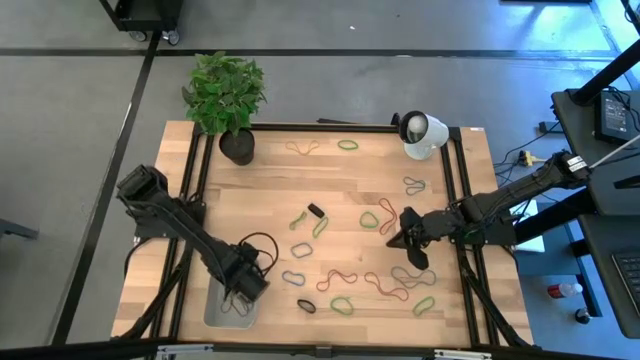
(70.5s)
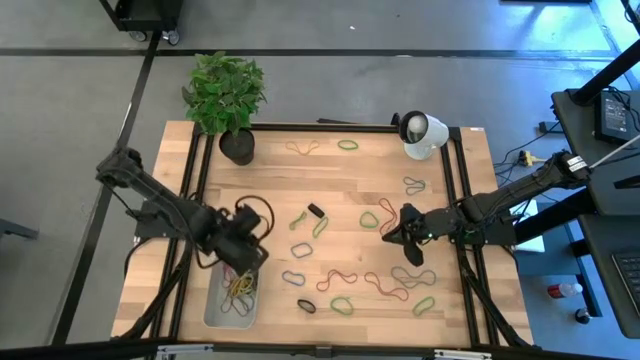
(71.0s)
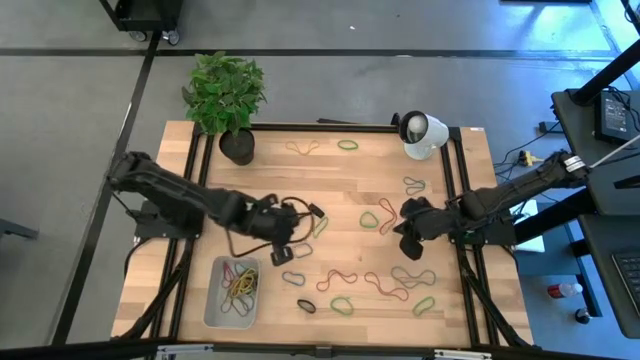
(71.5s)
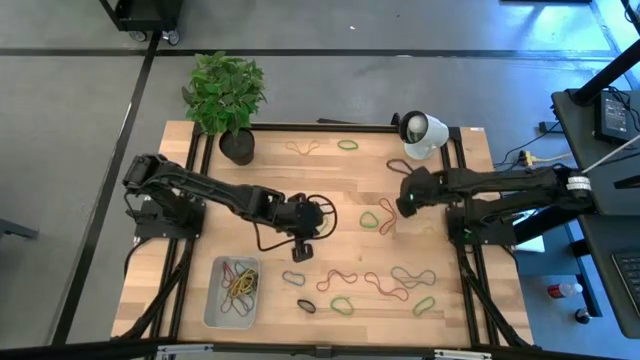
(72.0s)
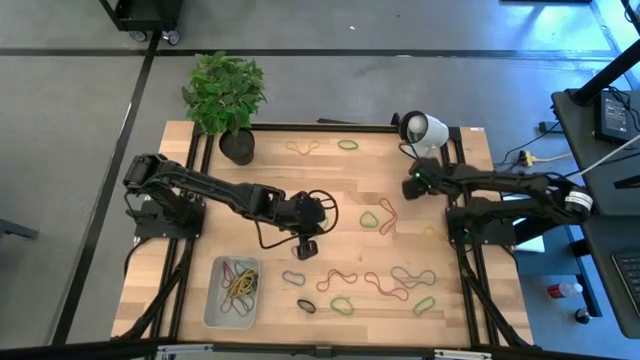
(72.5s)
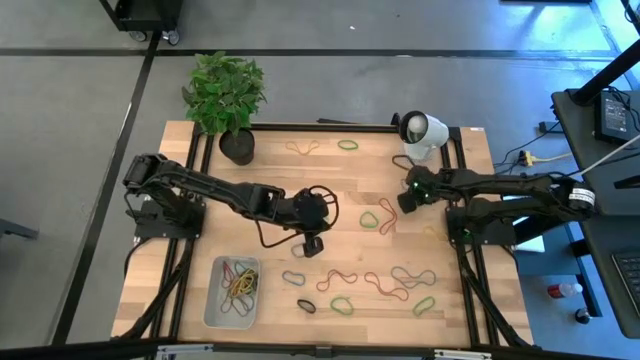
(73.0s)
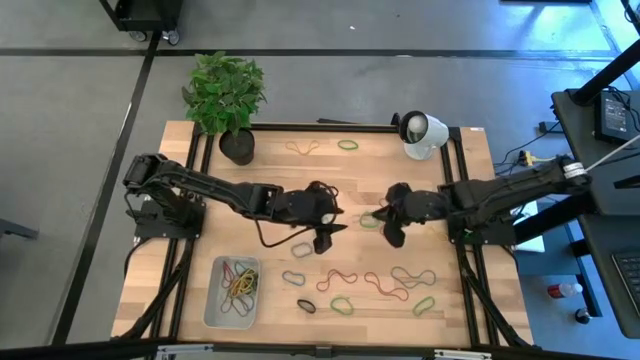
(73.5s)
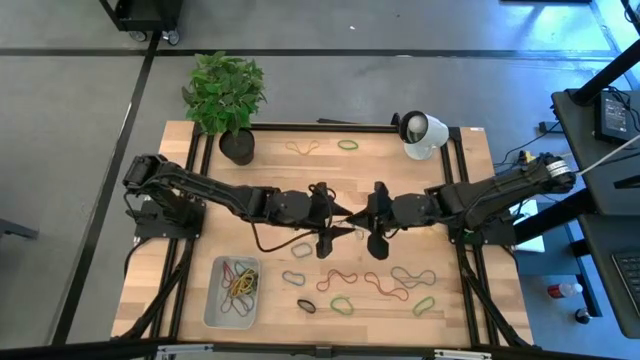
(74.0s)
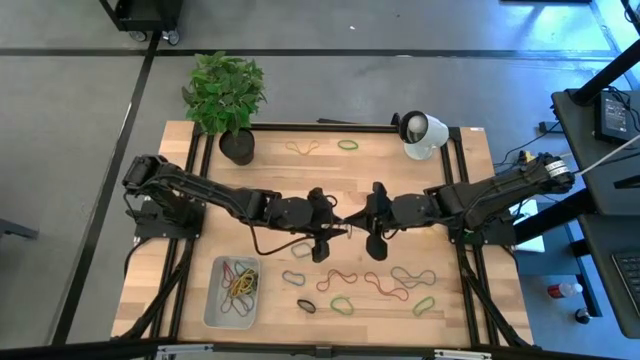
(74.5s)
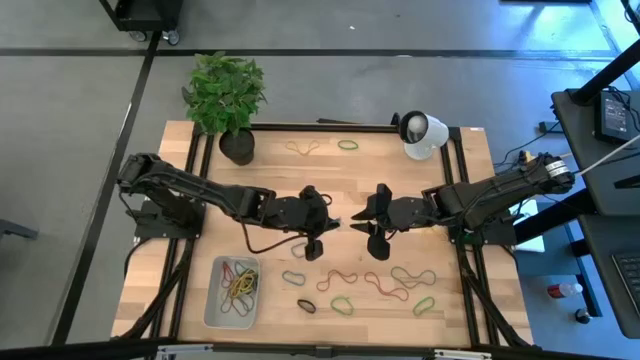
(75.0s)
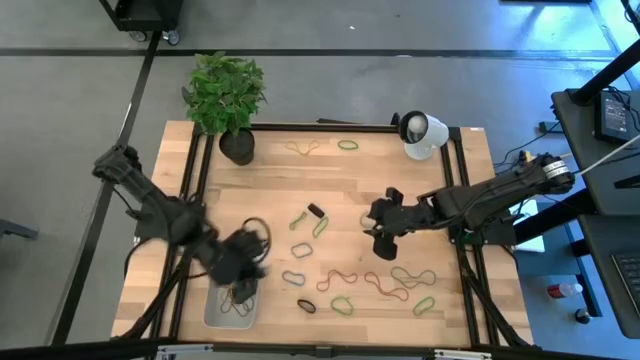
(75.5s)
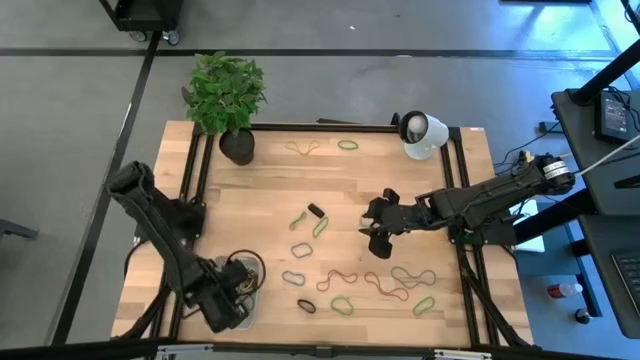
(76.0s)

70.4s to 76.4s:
Task: Pick and place rubber bands into bin
Put the blue rubber band into the bin

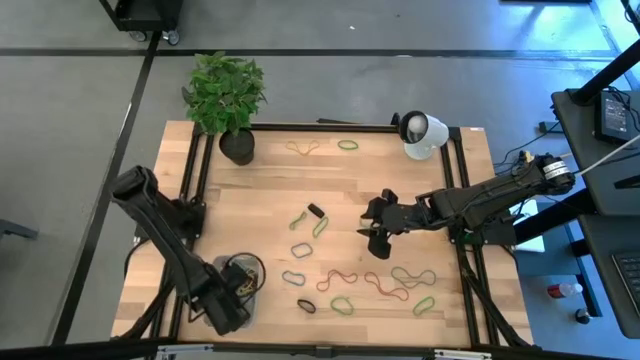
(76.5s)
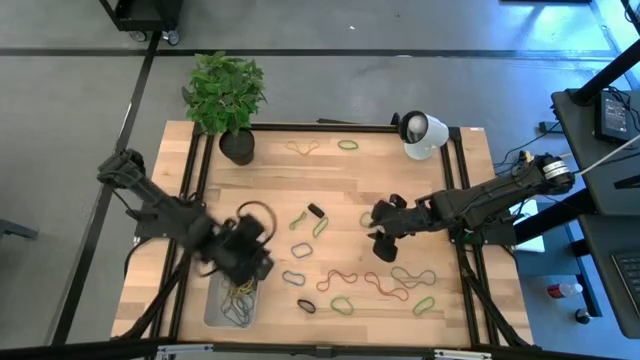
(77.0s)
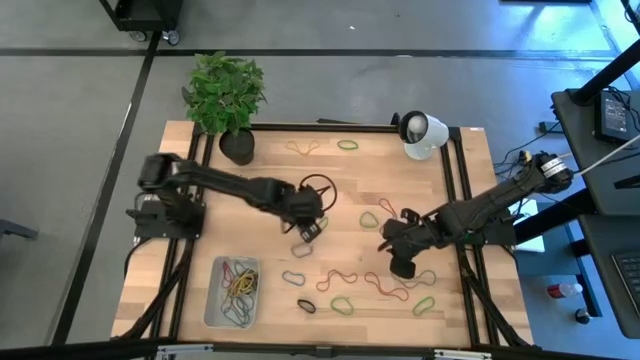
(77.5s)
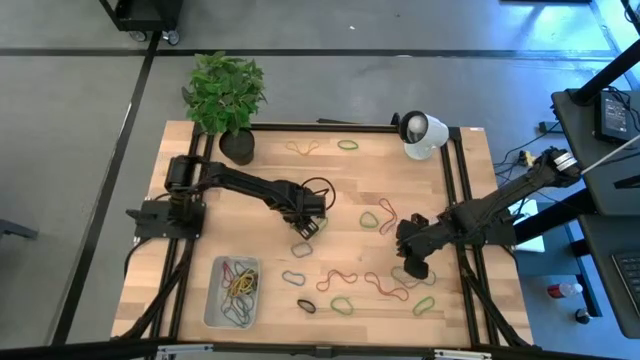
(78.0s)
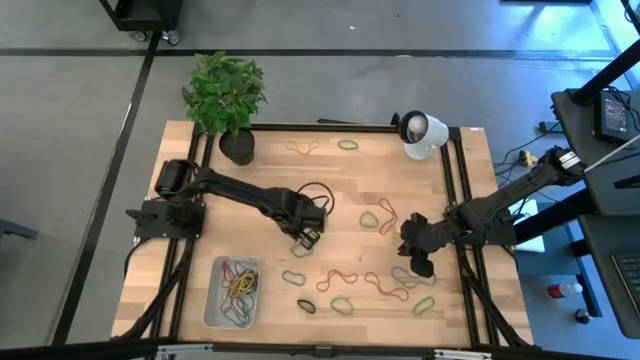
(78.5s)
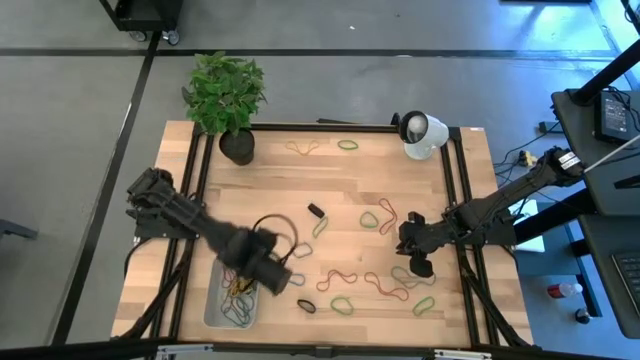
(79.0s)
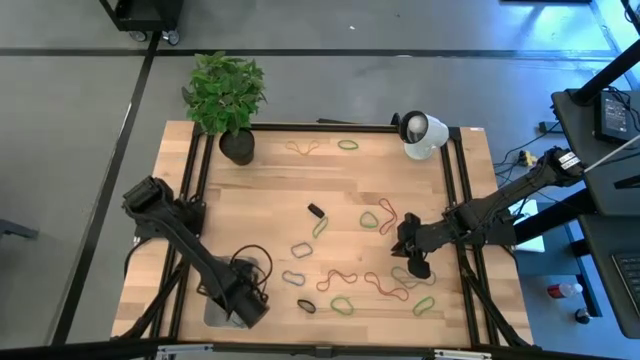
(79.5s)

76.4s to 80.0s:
Put the green rubber band into the bin

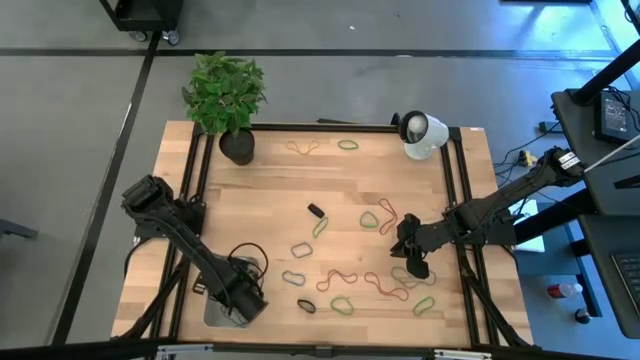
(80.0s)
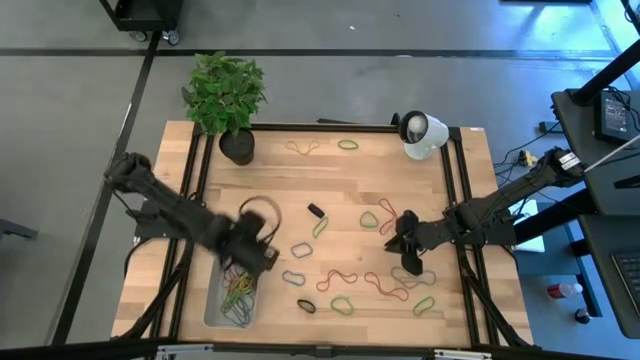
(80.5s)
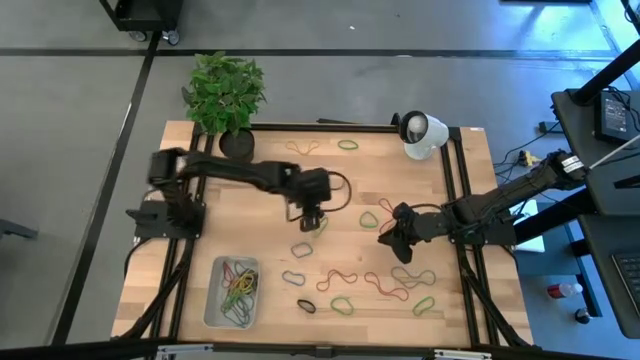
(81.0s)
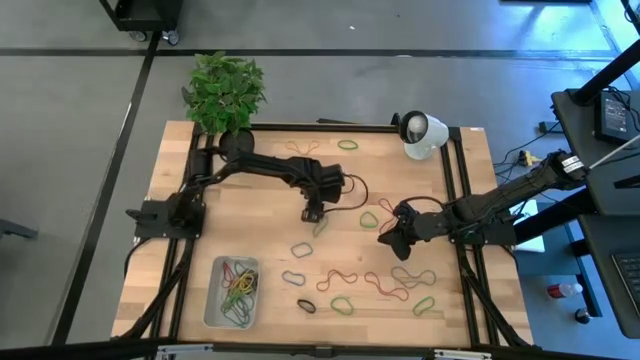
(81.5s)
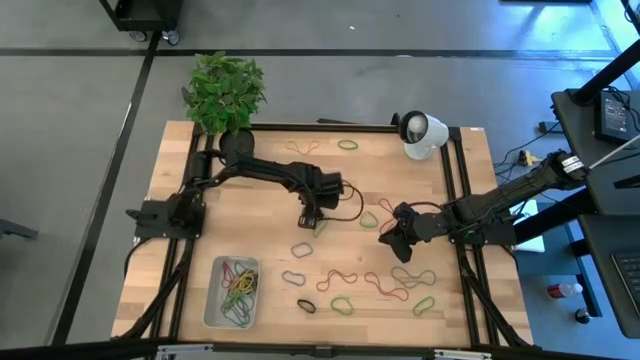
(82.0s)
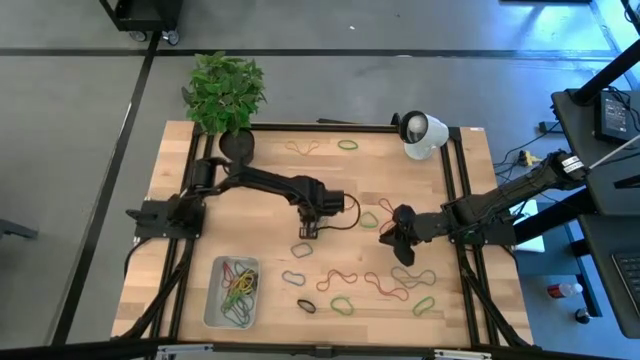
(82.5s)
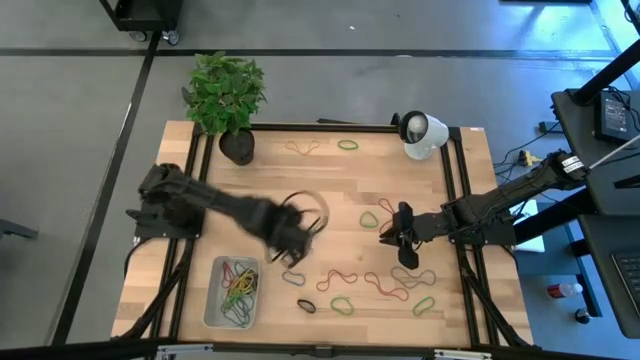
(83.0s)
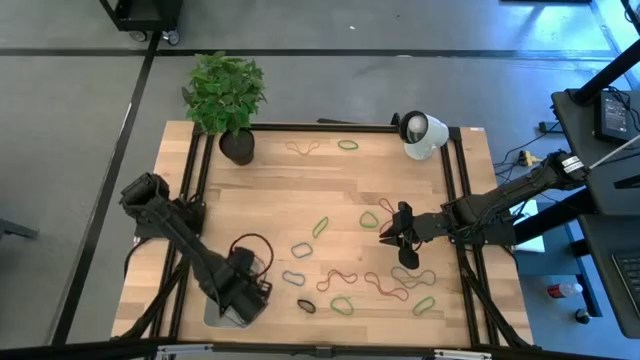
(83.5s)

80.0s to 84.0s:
Put the black rubber band into the bin

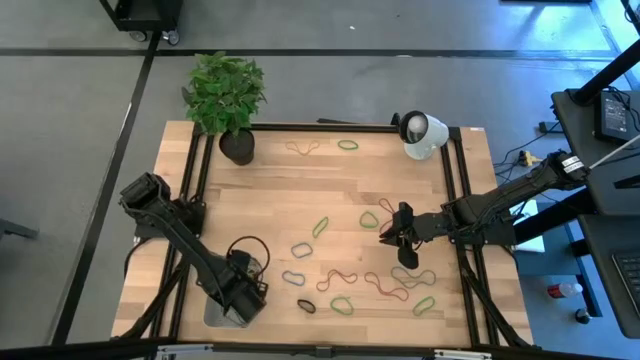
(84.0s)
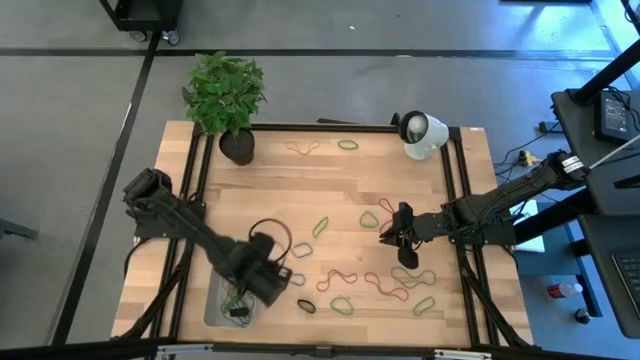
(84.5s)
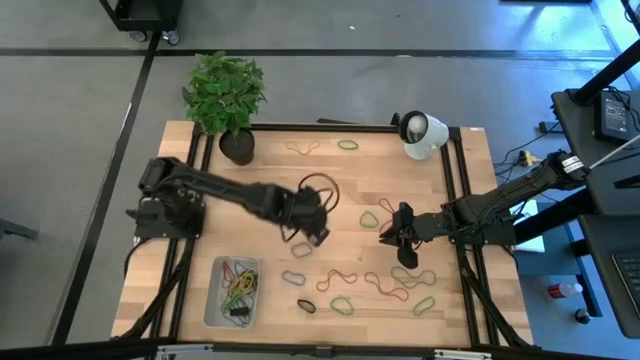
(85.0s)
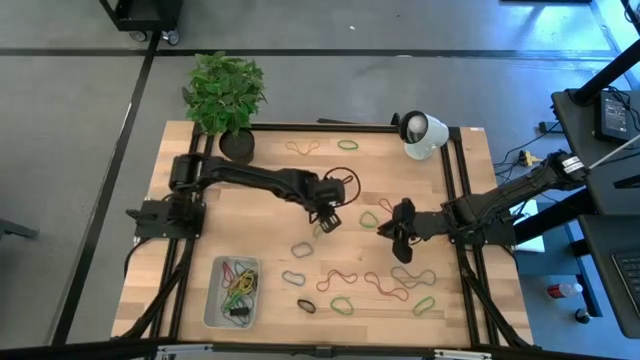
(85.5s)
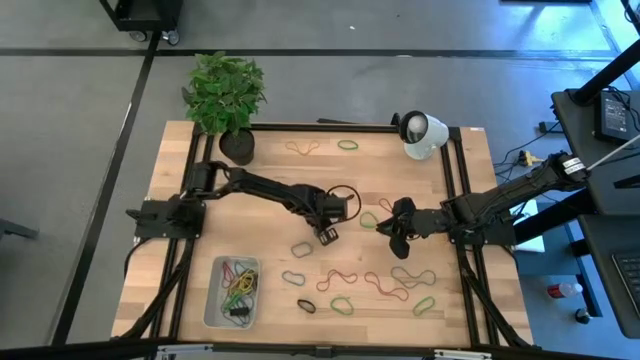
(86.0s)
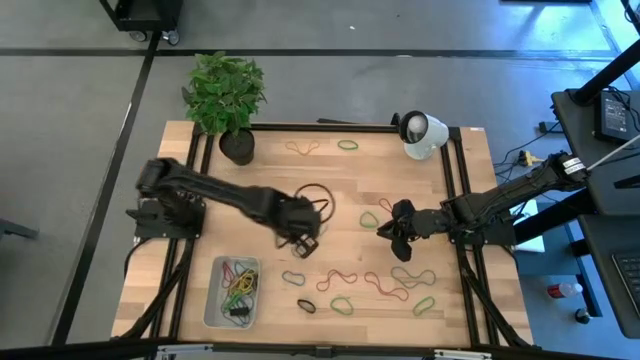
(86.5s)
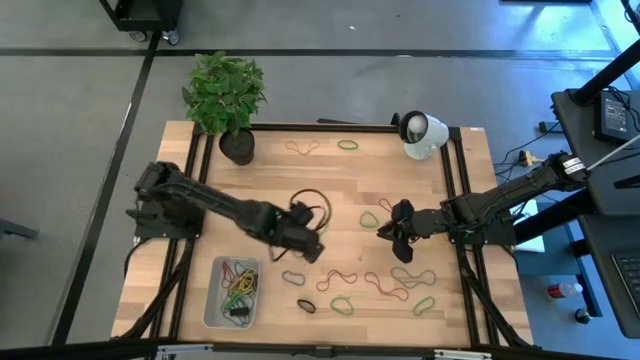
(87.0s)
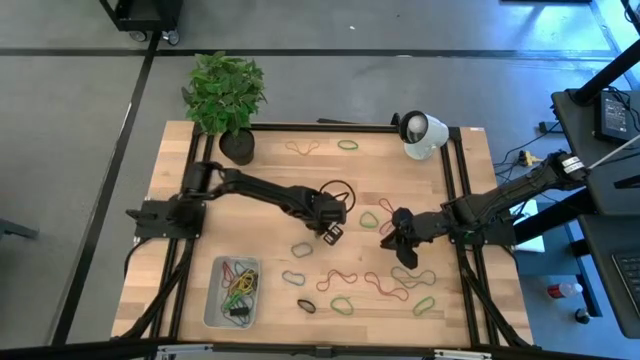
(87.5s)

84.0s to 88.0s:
Put the green rubber band into the bin

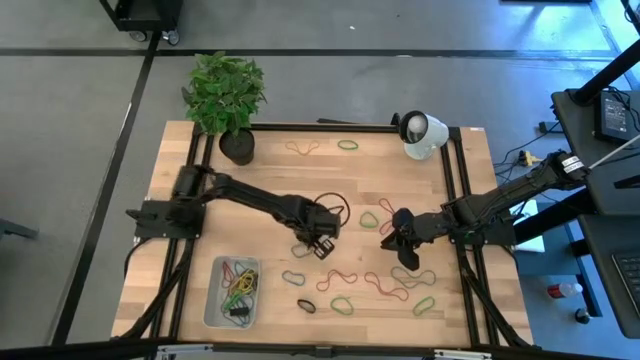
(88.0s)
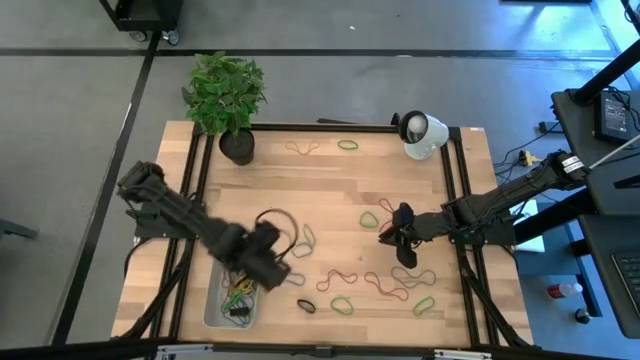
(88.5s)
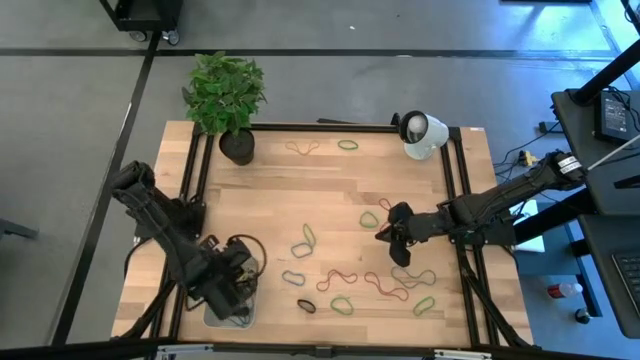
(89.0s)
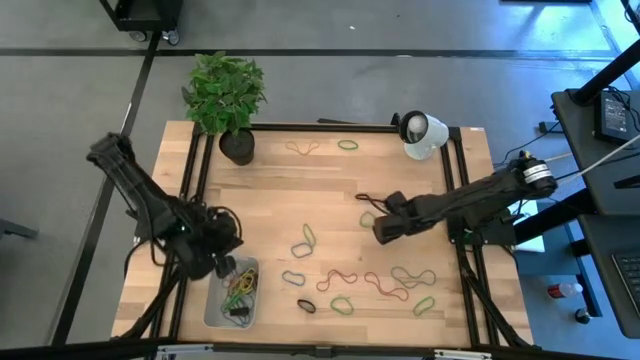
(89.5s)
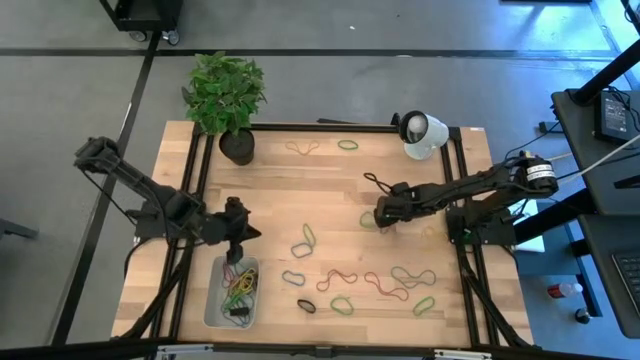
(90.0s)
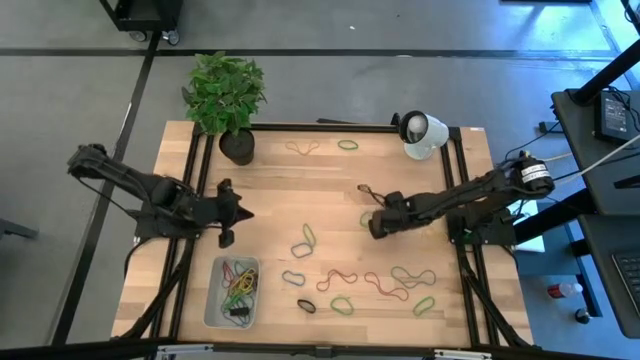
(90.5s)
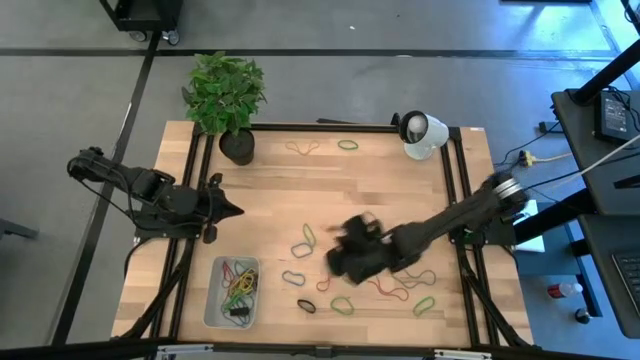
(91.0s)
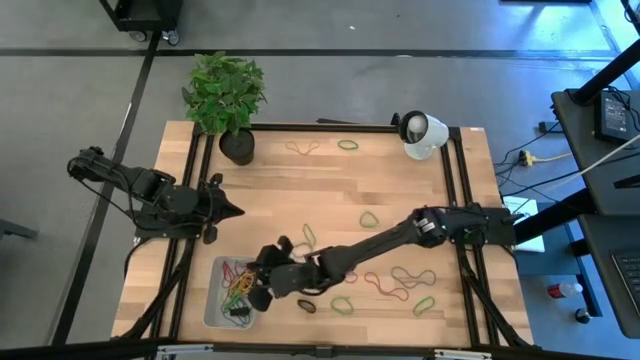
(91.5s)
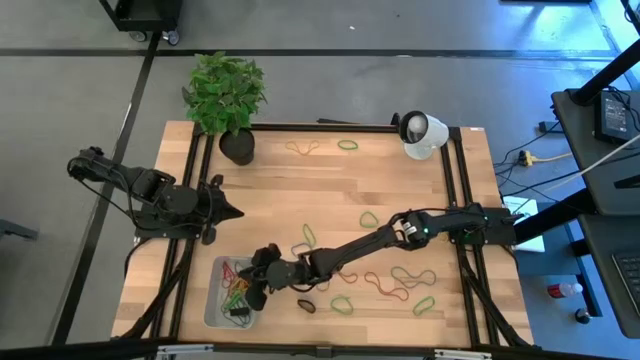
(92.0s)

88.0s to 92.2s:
Put the red rubber band into the bin
